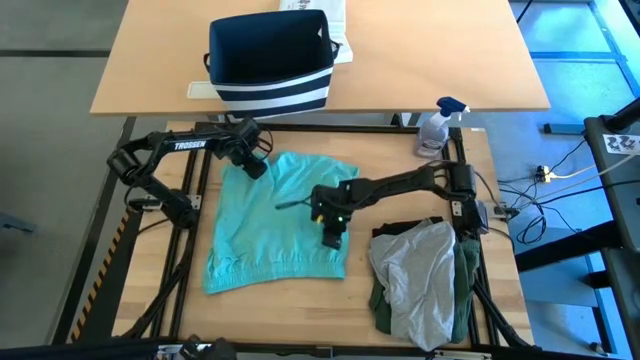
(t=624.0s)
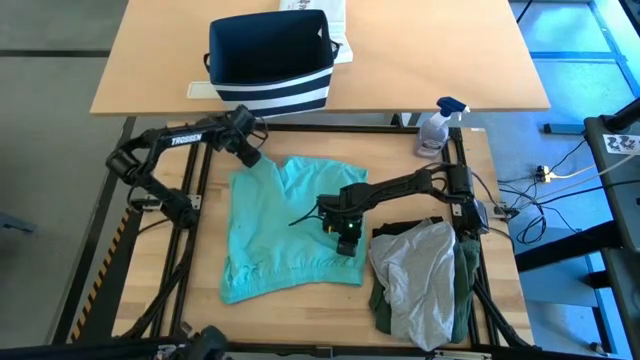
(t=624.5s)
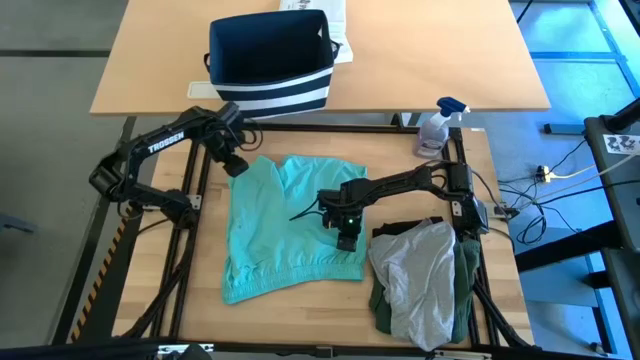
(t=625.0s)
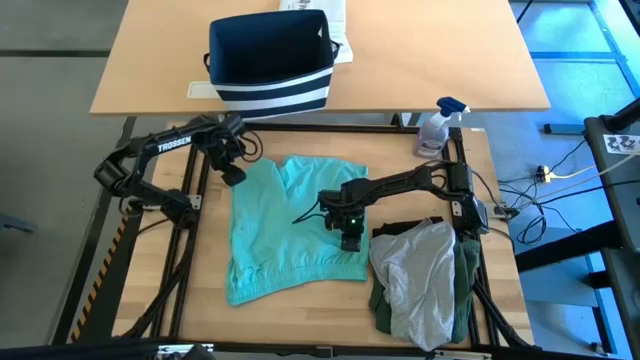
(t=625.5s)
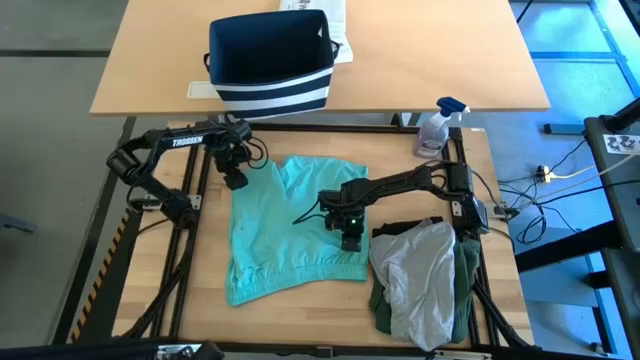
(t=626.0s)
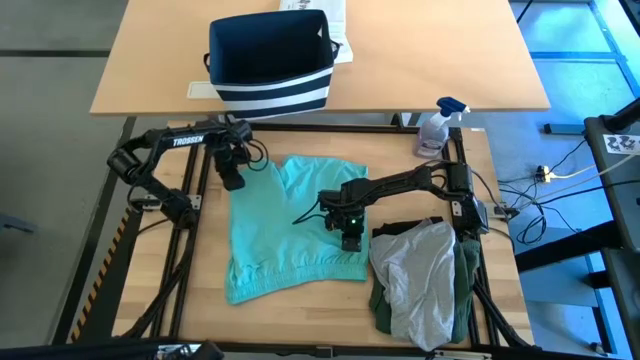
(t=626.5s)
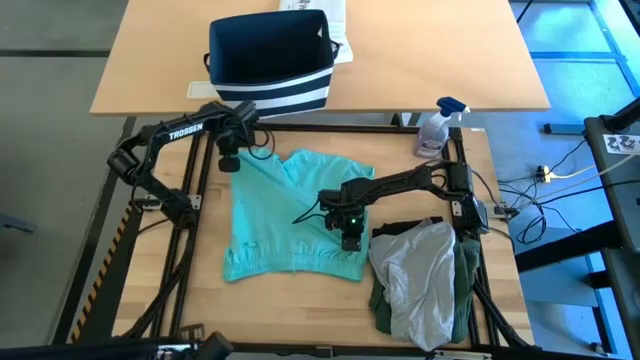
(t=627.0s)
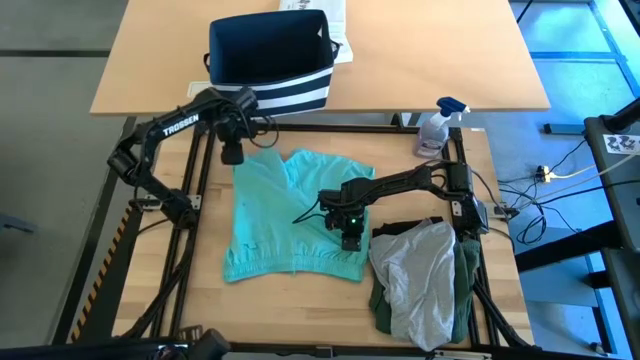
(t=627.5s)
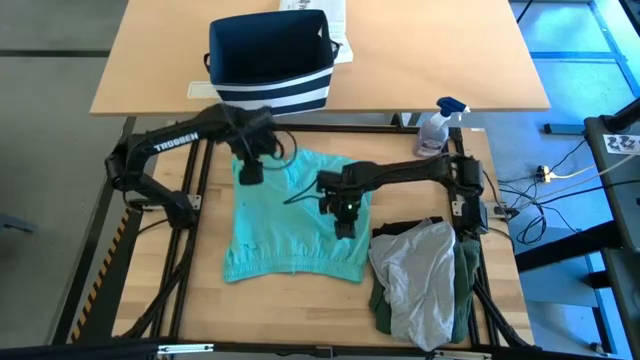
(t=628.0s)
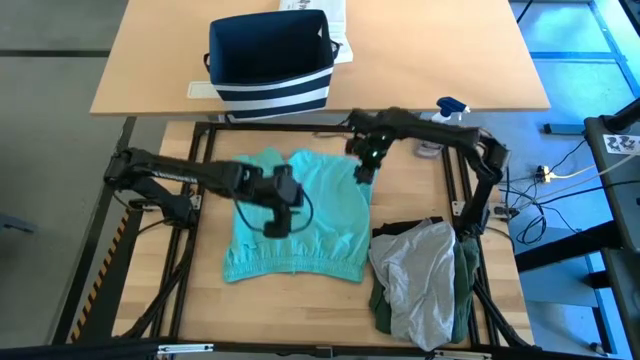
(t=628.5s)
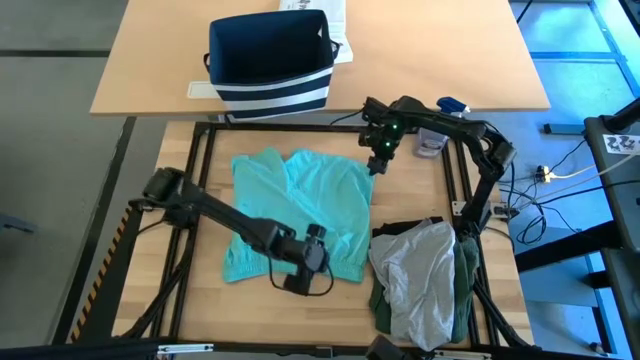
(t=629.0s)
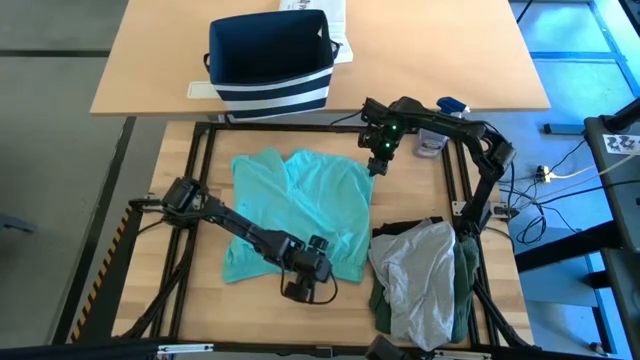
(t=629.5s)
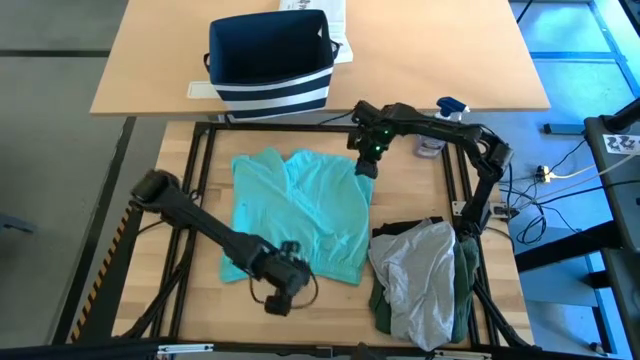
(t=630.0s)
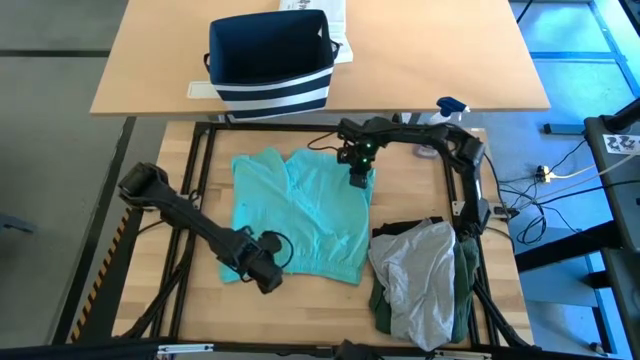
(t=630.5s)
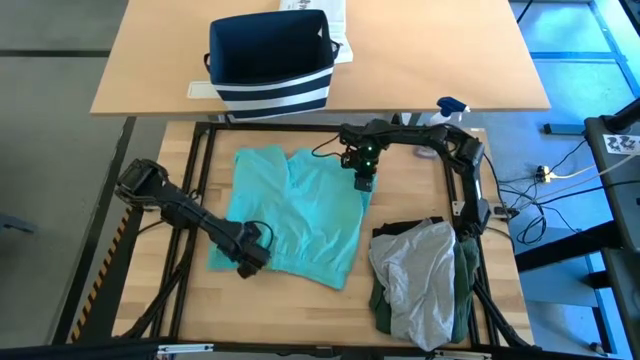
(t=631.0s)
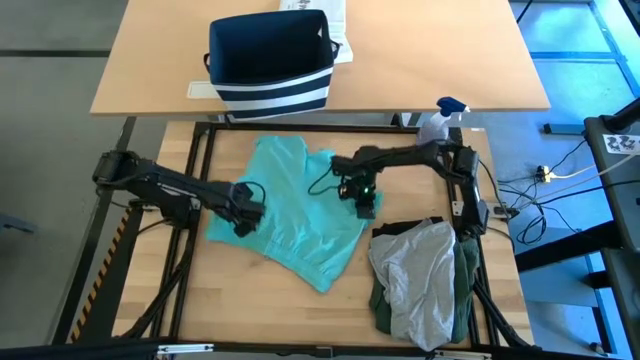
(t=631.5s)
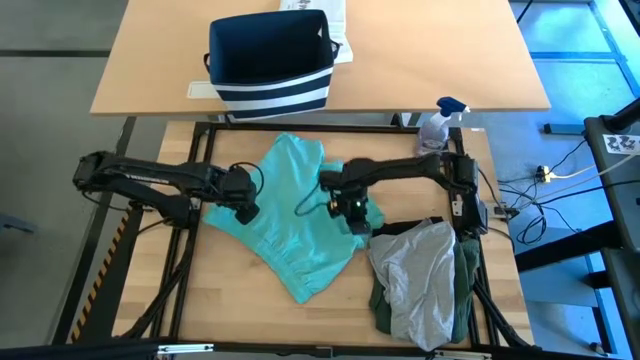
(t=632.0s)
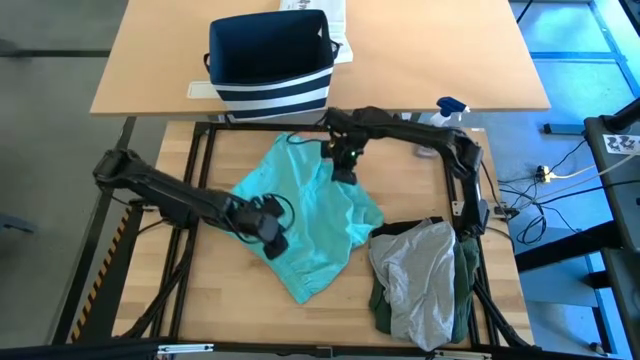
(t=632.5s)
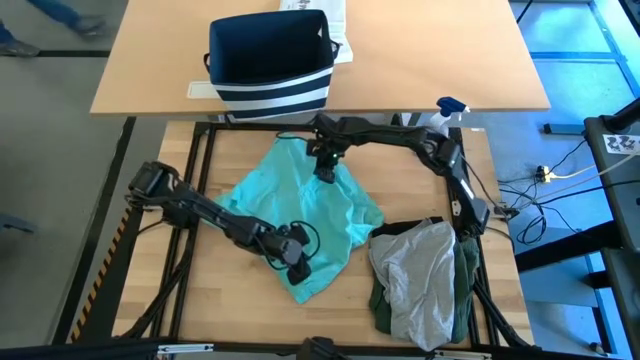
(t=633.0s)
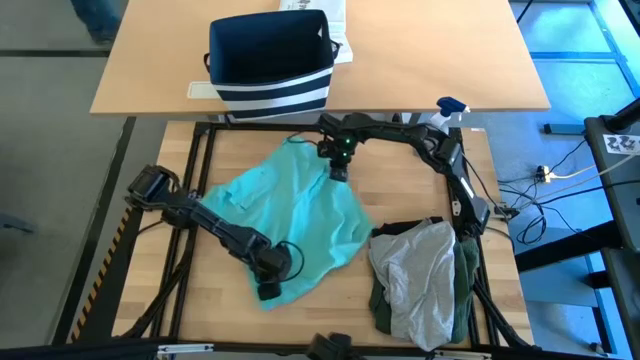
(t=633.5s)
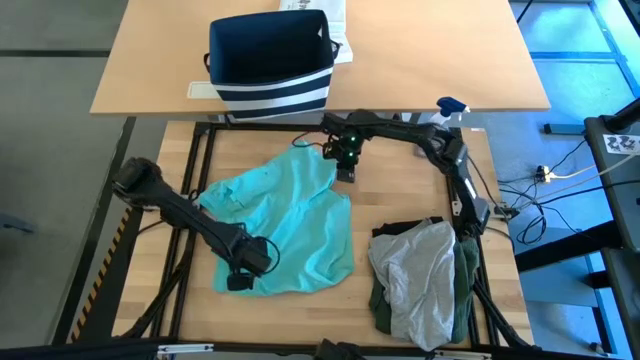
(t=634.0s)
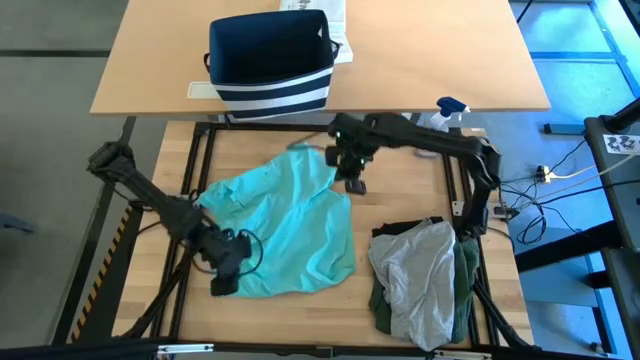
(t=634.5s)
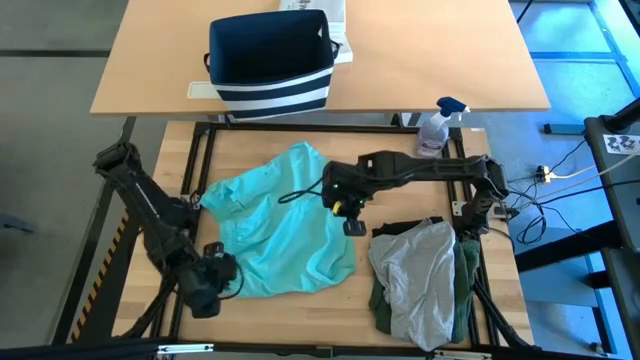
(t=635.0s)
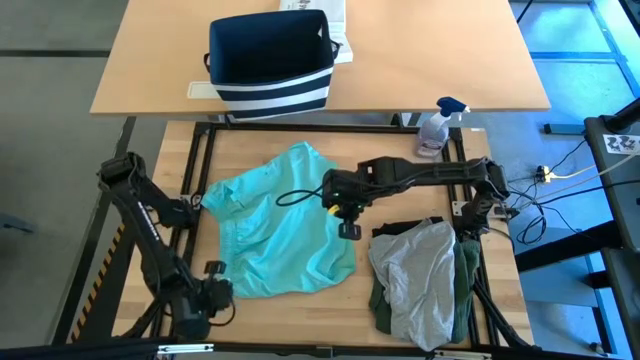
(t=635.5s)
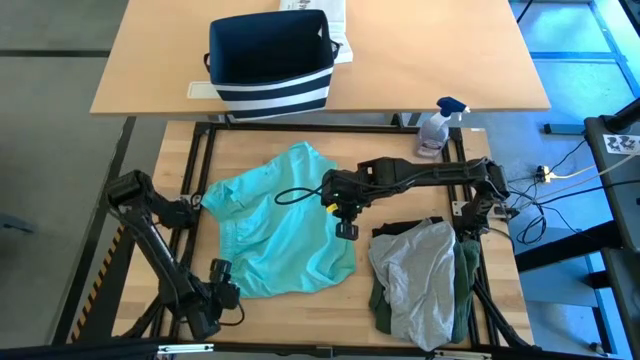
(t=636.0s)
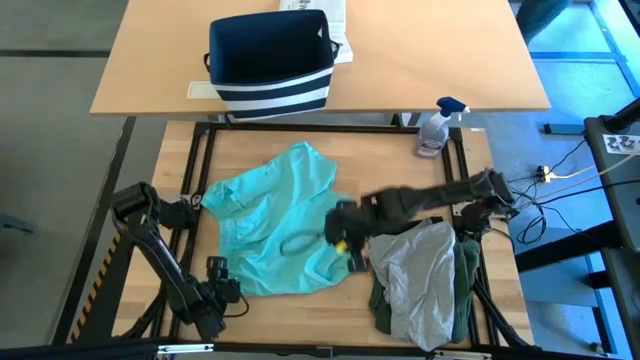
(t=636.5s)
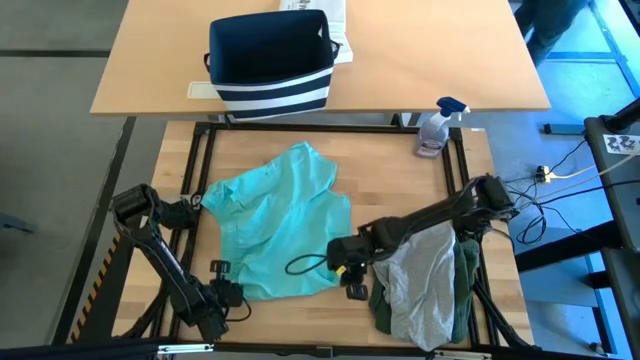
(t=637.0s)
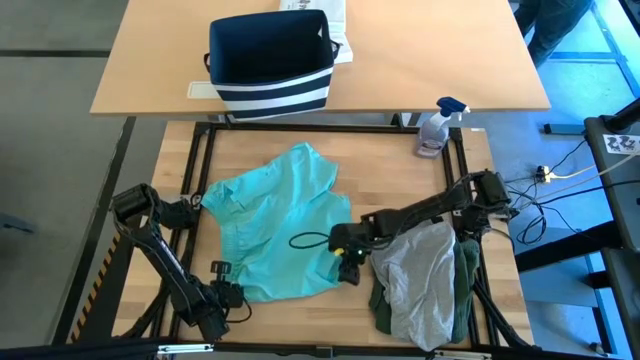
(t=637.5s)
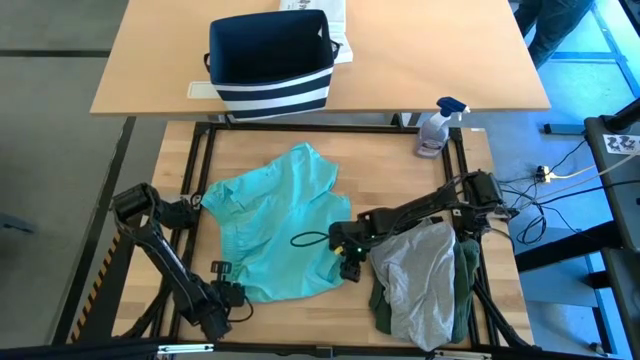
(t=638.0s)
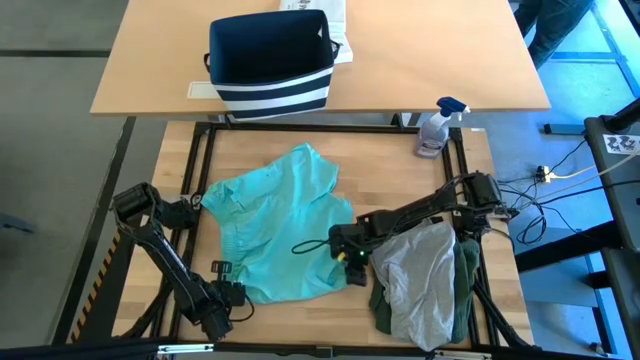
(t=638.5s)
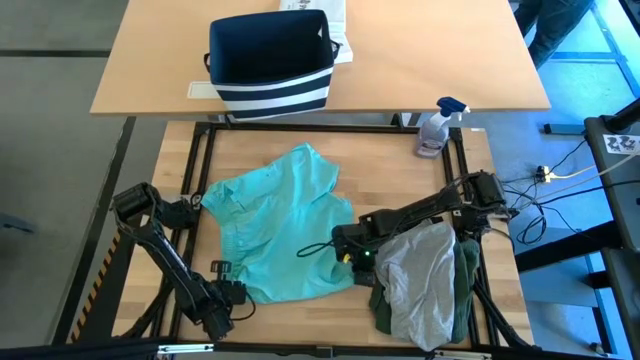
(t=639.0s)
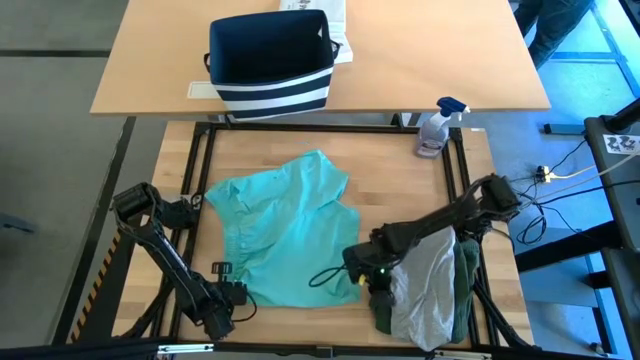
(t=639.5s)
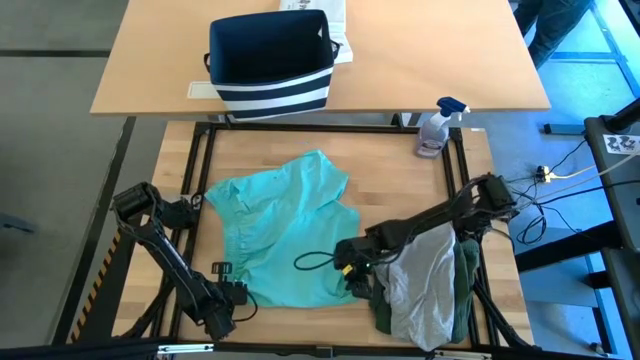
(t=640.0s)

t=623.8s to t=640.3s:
Task: Fold Laundry from Bin
Fold the blue shorts

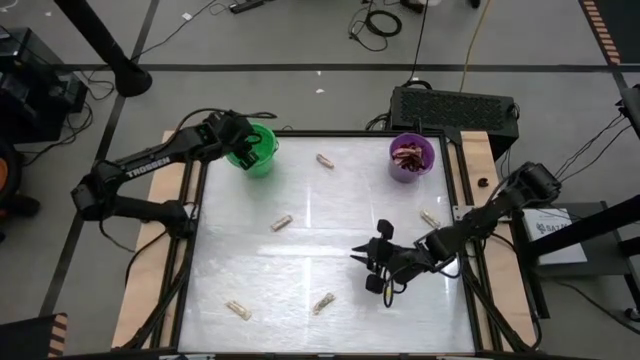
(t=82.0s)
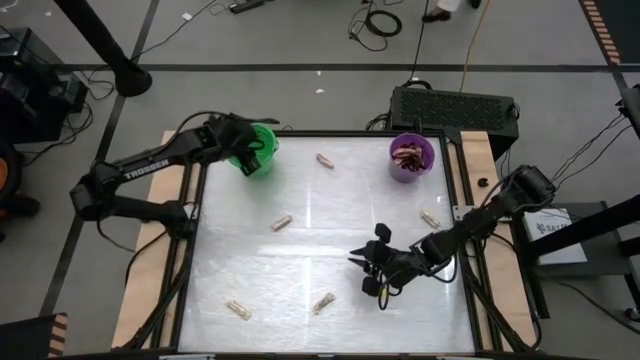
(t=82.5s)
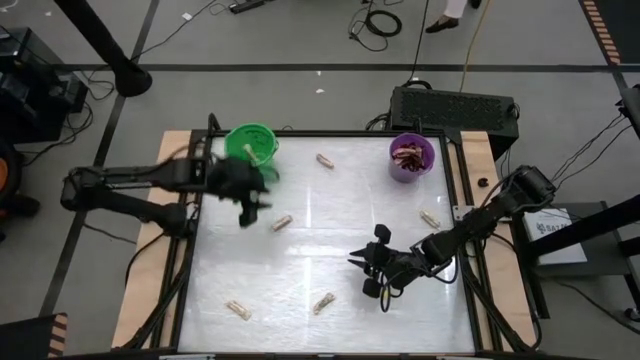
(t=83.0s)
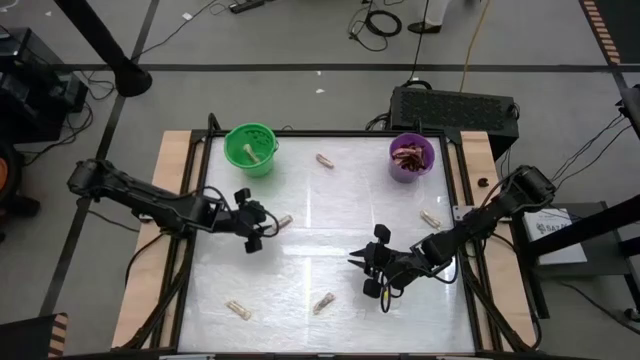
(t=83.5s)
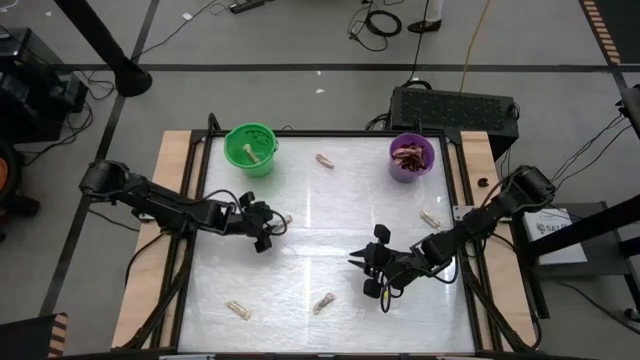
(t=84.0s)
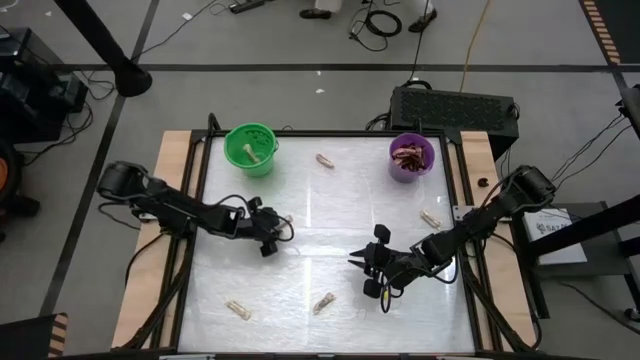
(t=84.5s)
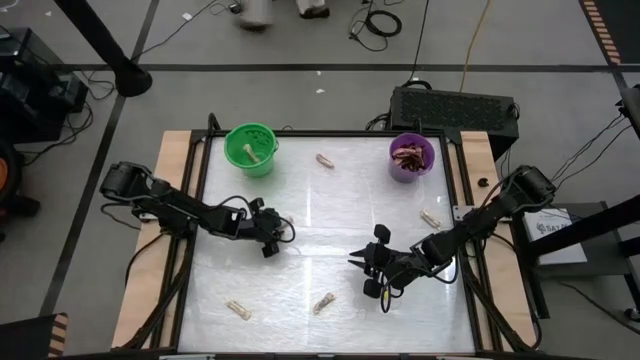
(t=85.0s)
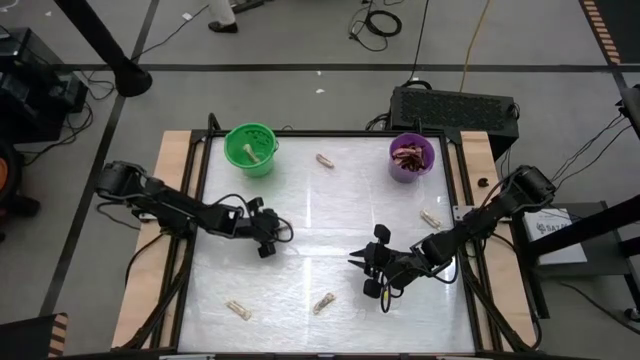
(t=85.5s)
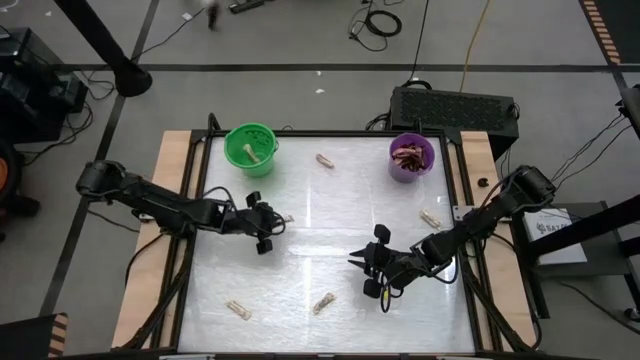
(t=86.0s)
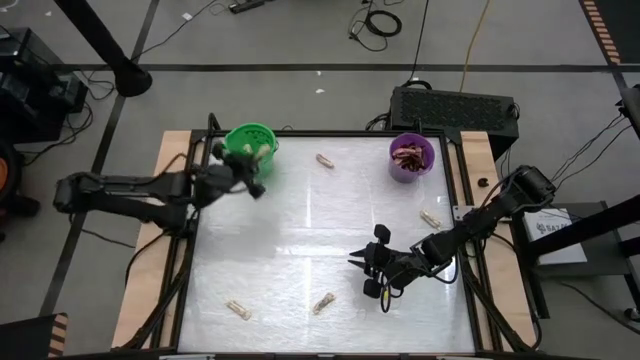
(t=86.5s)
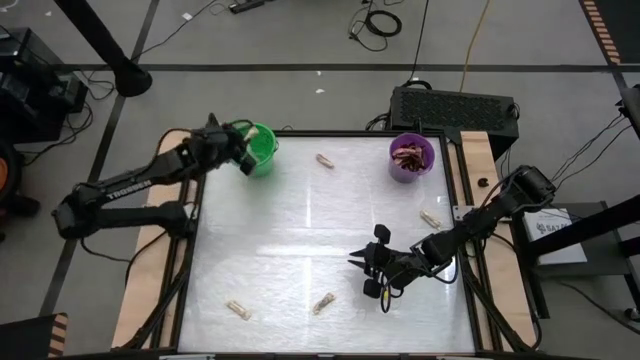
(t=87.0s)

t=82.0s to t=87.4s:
Task: Sort candy by brand, put in halloween buckets
Put the white chocolate bar into the green bucket
